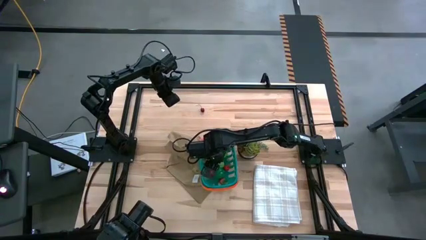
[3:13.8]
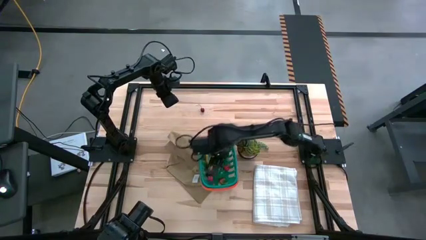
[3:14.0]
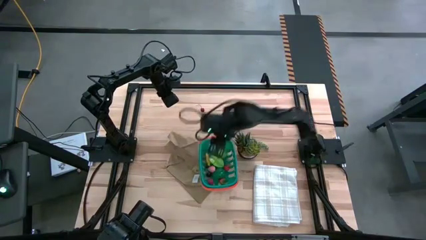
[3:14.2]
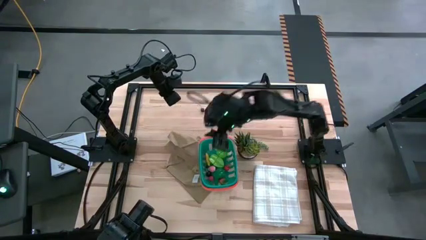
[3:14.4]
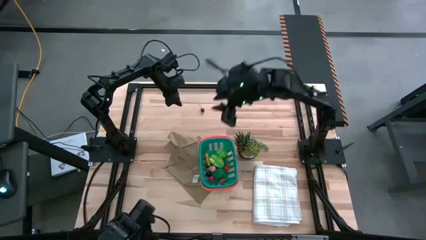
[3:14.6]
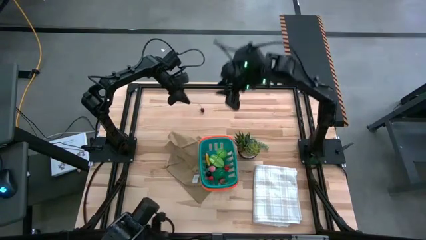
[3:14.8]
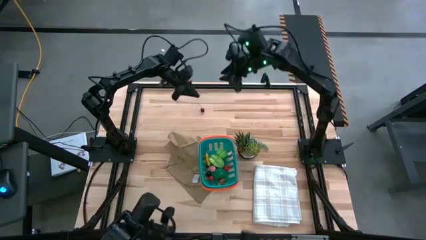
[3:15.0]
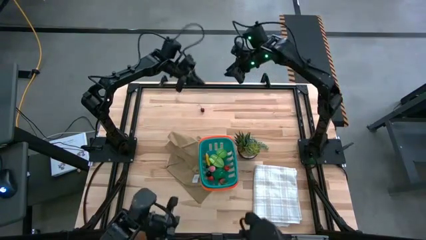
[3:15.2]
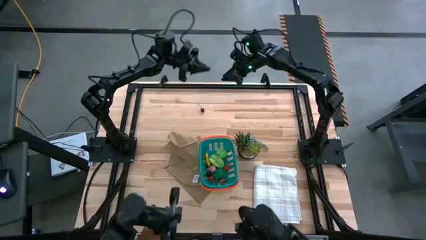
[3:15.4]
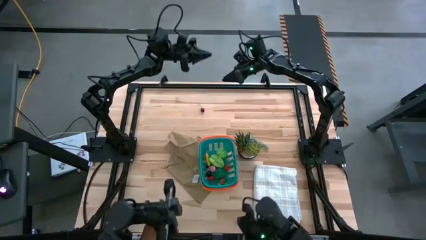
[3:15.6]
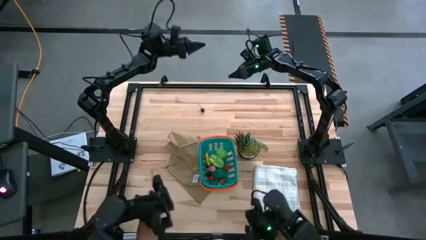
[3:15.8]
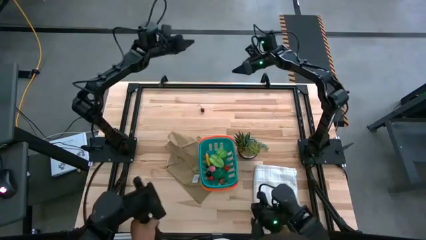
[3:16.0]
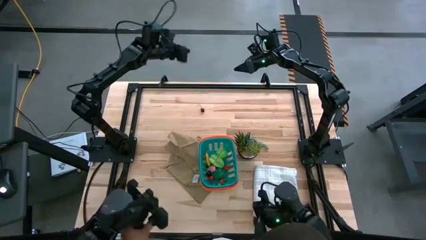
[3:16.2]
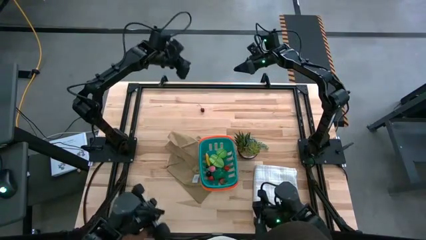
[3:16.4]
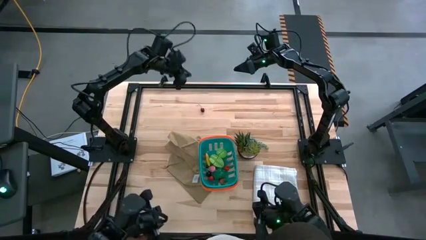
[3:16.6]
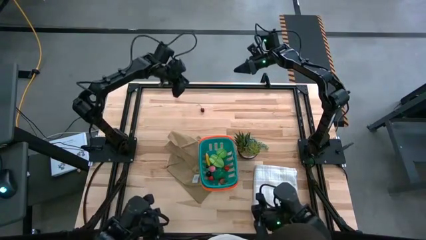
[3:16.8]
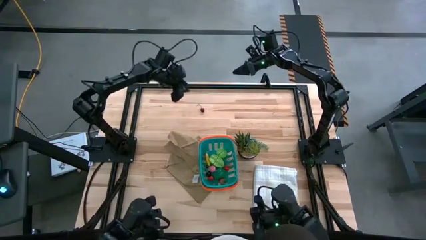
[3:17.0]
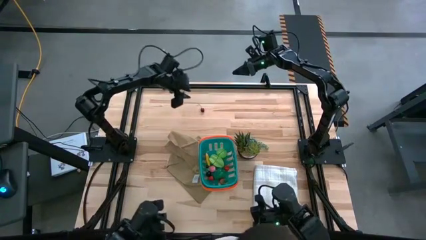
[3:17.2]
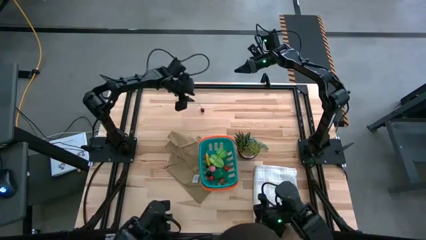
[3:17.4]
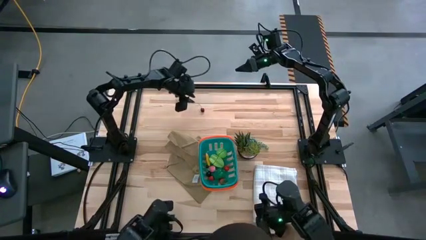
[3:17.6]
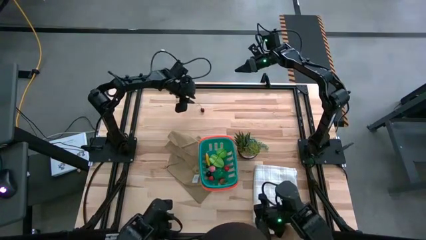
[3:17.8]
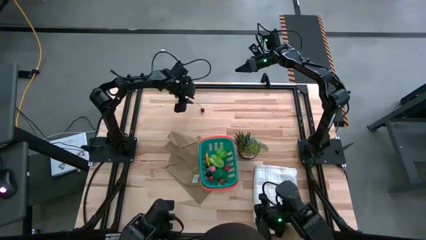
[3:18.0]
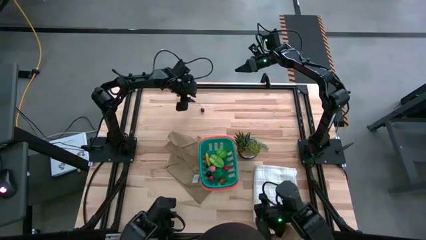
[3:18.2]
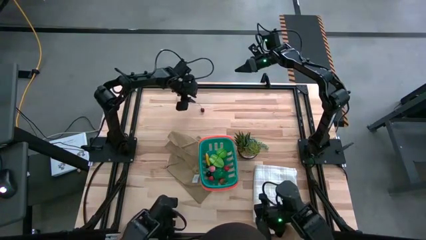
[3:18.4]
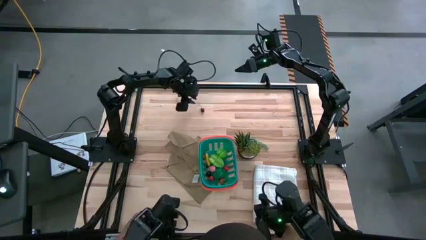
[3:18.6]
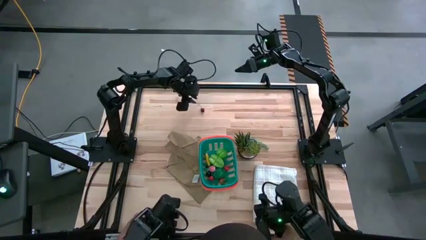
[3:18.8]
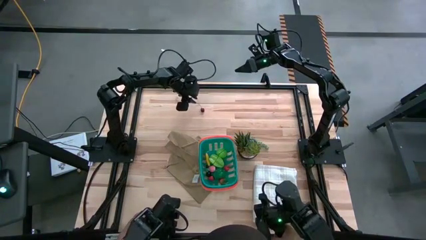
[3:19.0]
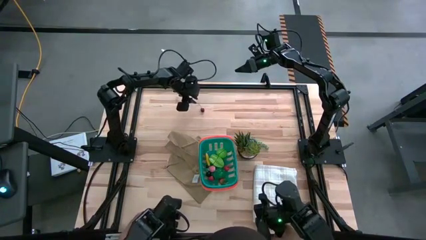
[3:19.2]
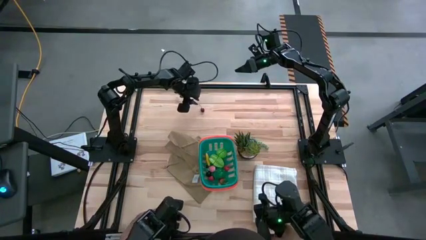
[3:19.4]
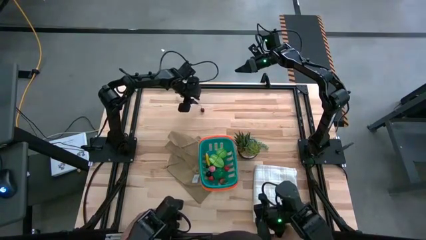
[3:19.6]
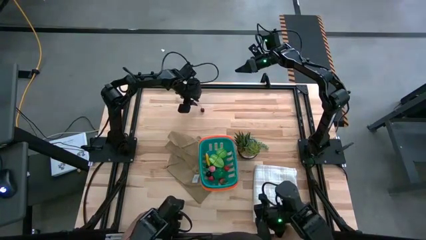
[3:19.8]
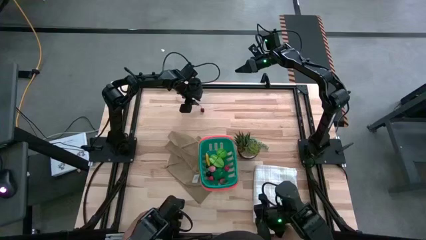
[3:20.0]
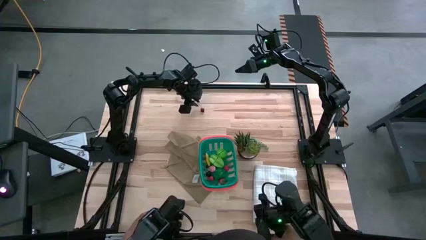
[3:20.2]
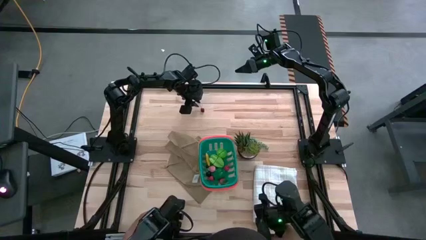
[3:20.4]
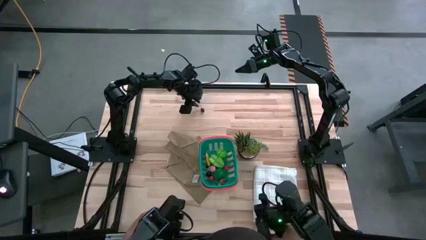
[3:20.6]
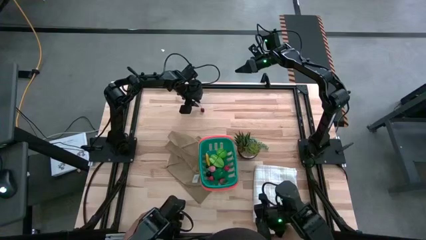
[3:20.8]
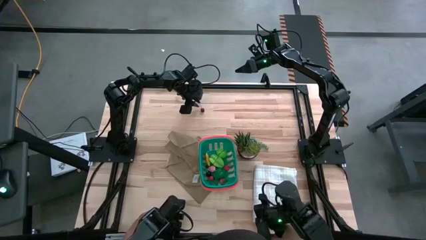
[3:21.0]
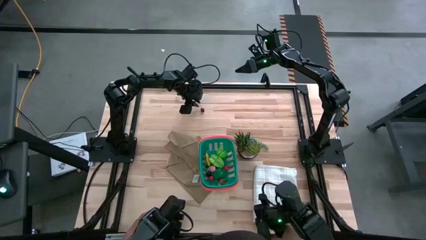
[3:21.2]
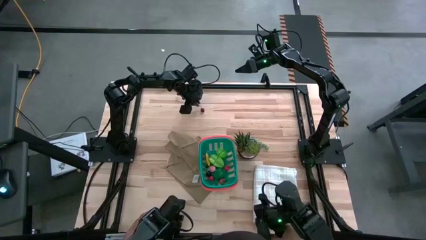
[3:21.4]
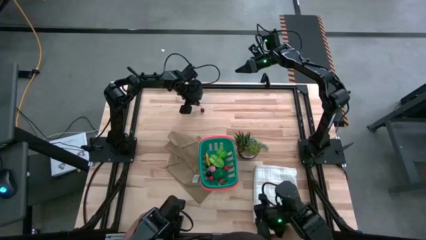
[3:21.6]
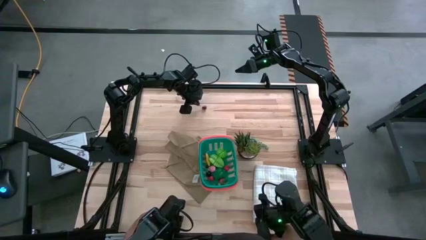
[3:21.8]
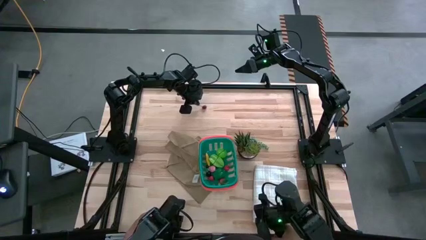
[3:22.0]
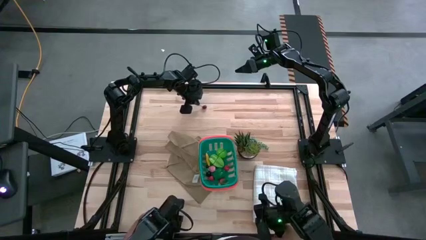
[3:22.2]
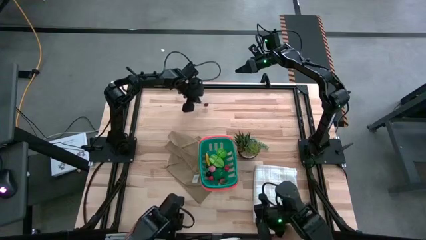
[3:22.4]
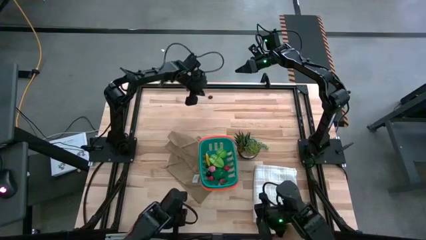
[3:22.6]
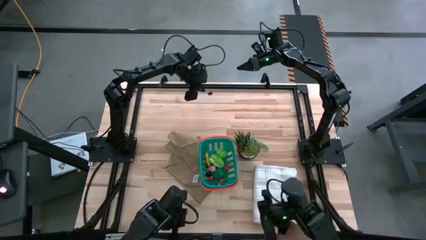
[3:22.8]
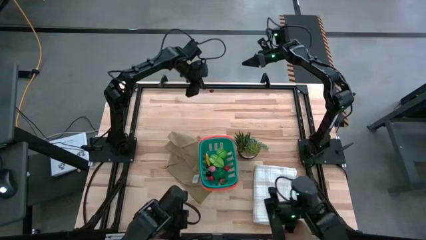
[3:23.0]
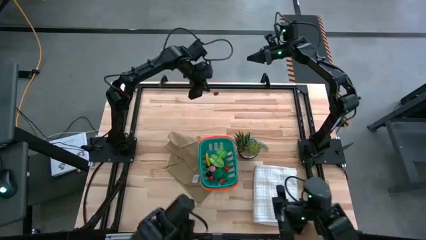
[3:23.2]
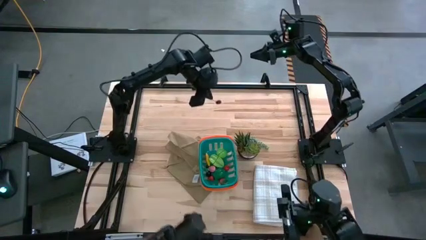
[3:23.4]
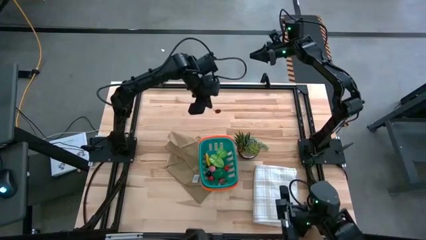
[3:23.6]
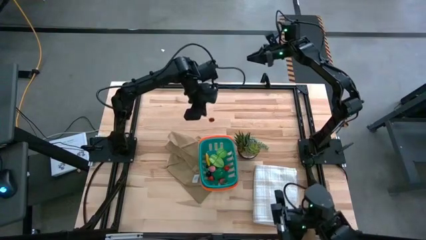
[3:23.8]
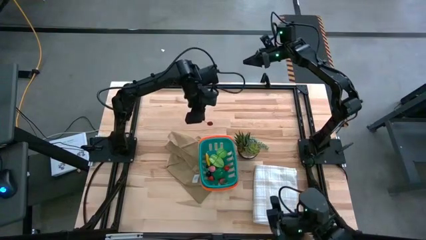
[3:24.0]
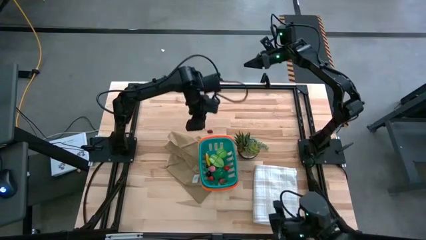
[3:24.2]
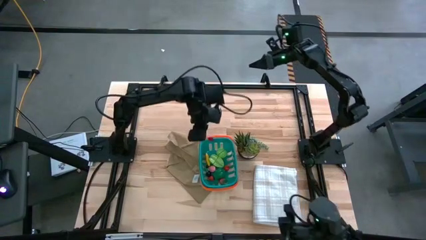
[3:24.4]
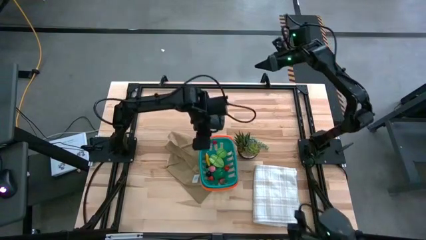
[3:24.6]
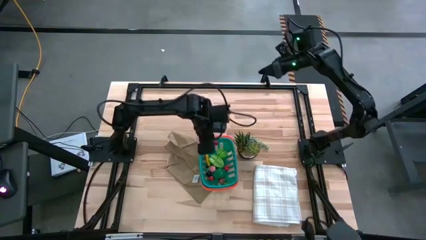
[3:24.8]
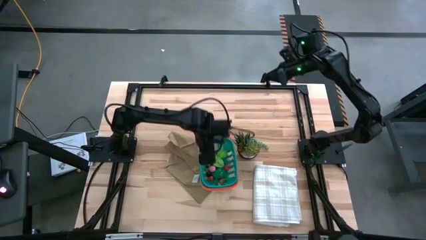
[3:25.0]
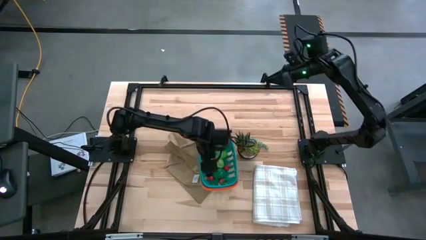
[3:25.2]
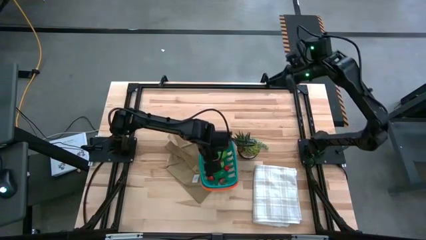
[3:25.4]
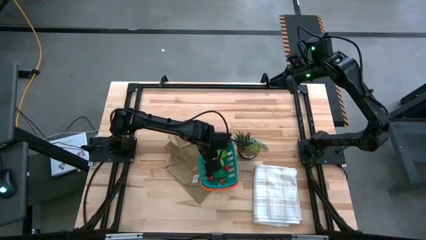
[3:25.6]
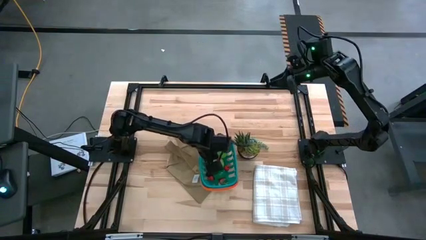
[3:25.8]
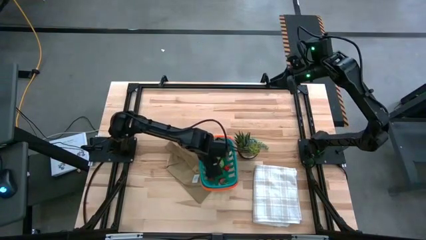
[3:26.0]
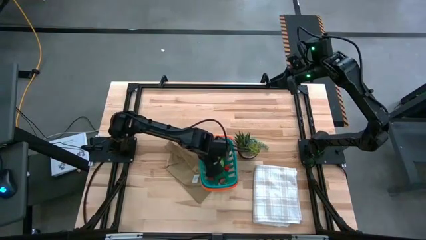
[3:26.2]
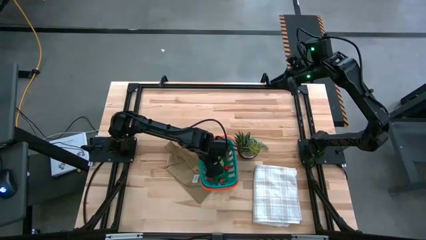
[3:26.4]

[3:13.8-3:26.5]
Task: Pick and placing Produce into tupperware
Put the red cherry into the green basket
